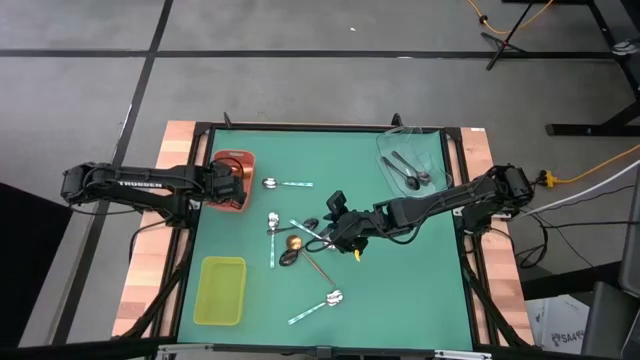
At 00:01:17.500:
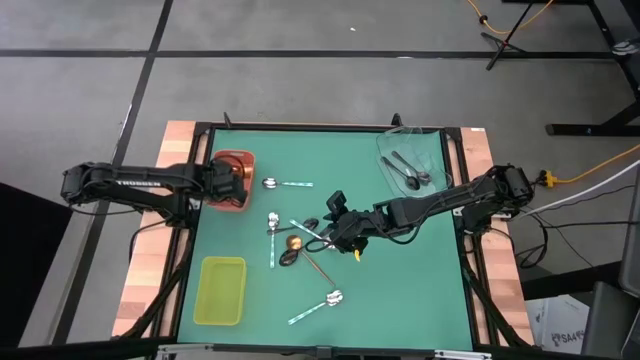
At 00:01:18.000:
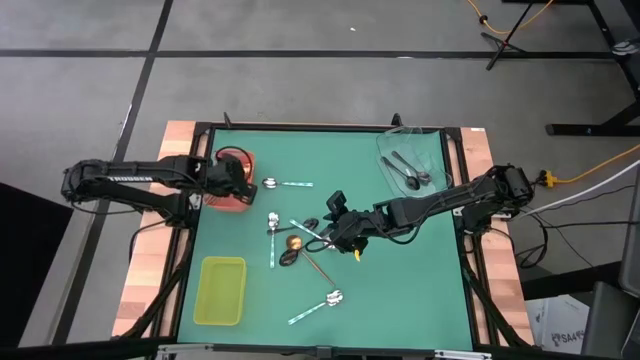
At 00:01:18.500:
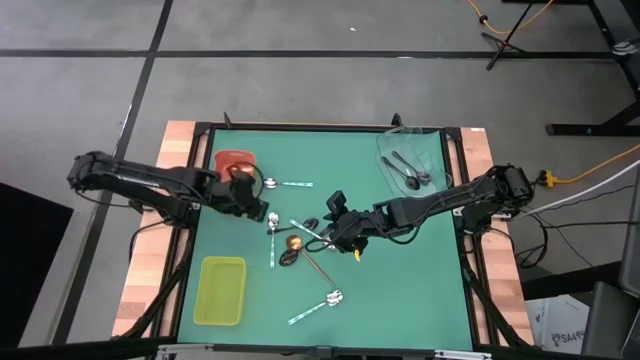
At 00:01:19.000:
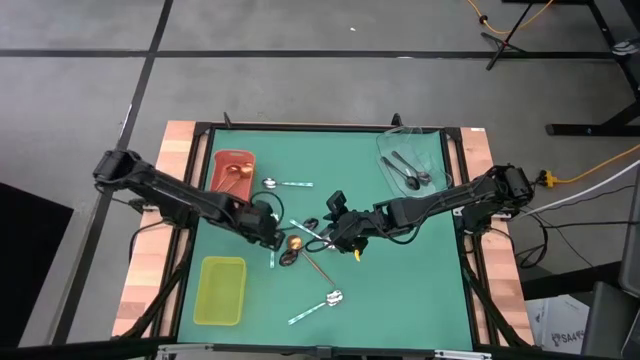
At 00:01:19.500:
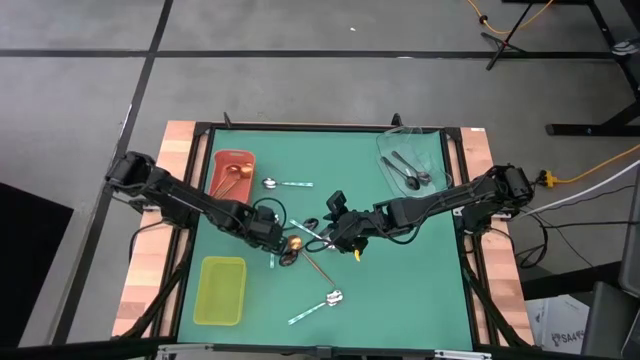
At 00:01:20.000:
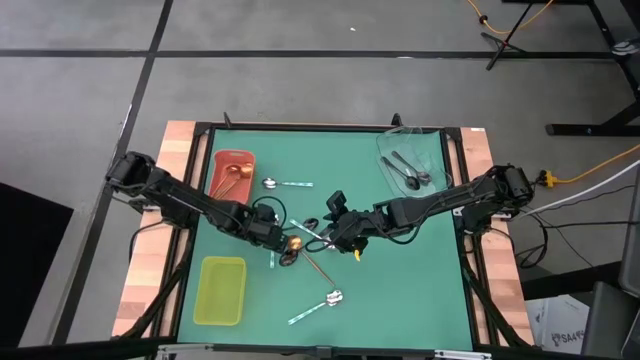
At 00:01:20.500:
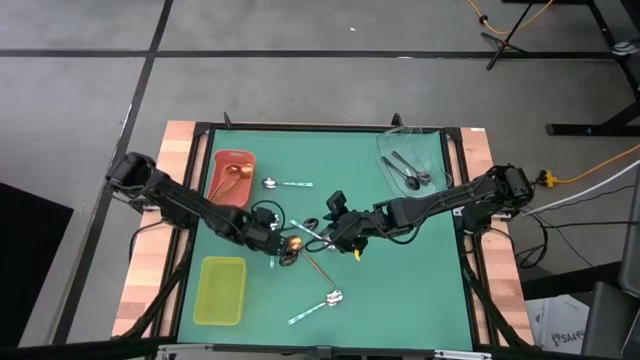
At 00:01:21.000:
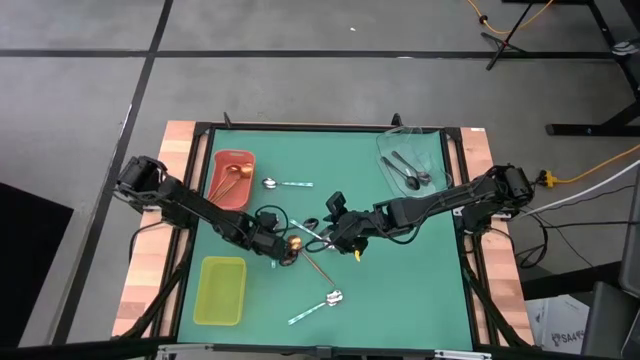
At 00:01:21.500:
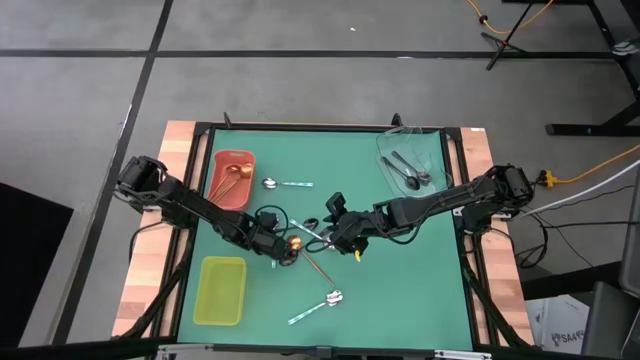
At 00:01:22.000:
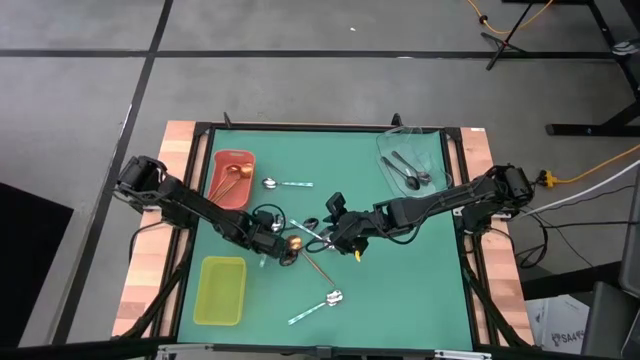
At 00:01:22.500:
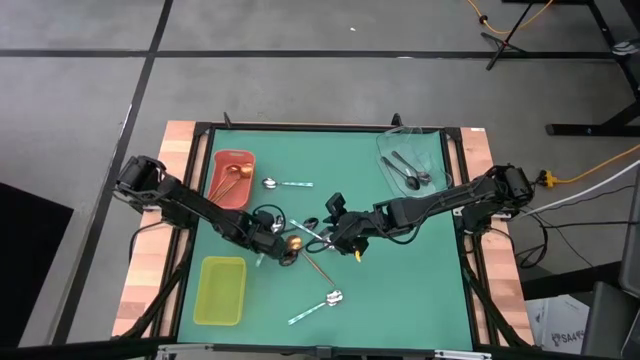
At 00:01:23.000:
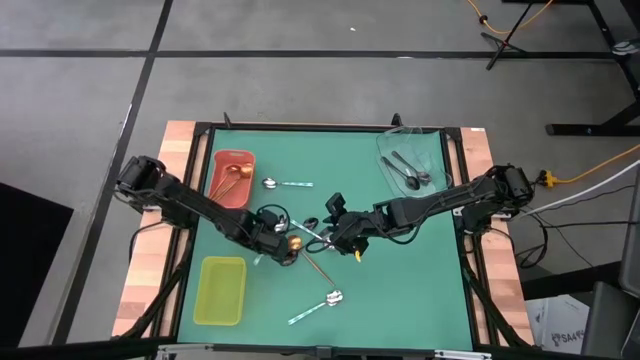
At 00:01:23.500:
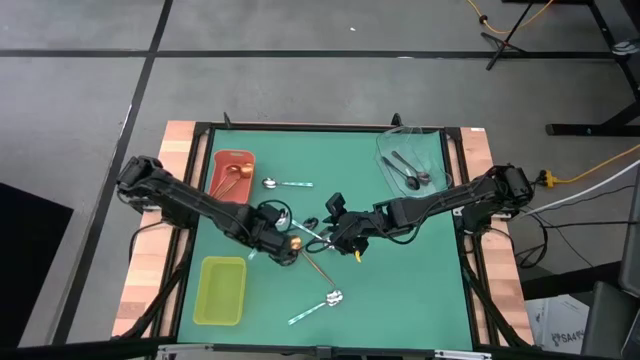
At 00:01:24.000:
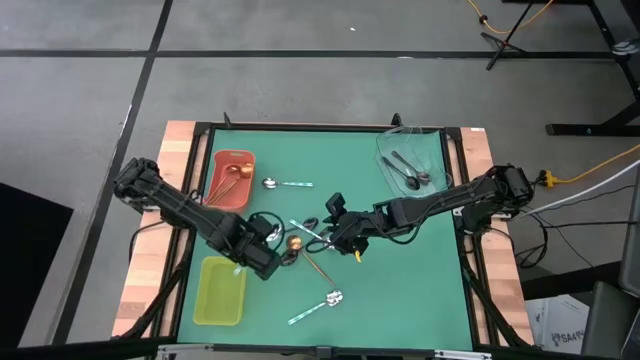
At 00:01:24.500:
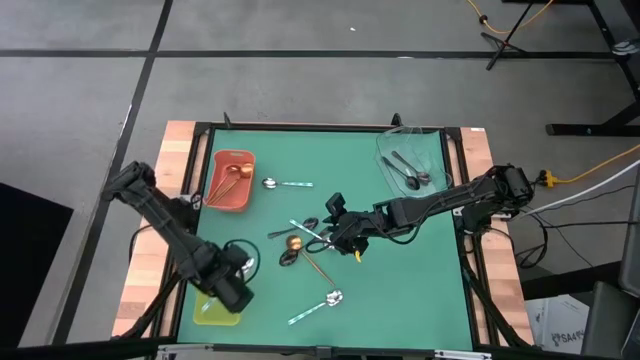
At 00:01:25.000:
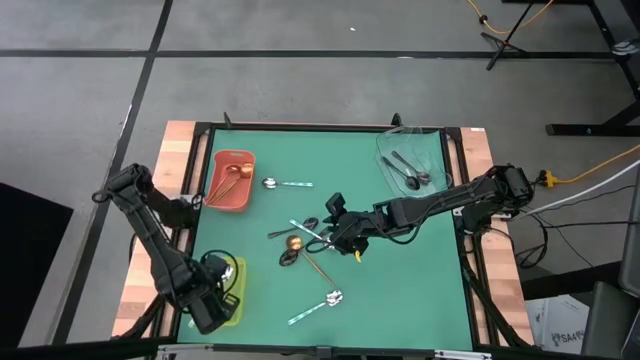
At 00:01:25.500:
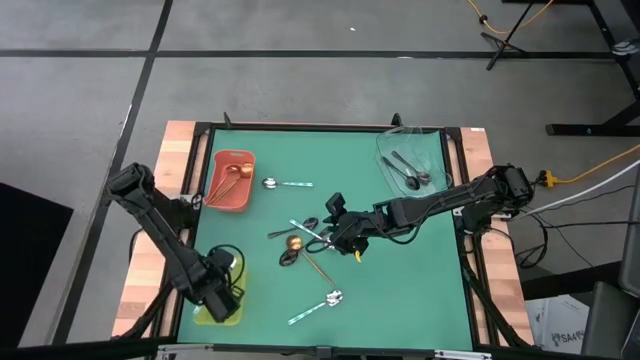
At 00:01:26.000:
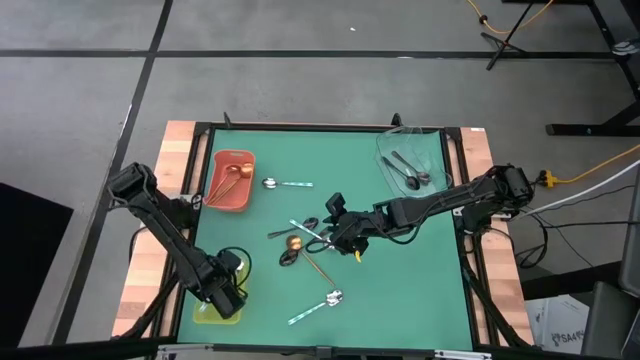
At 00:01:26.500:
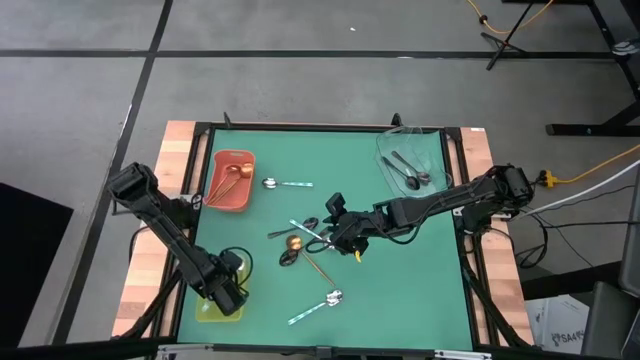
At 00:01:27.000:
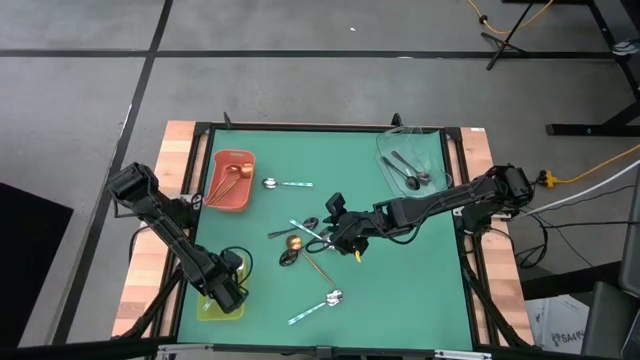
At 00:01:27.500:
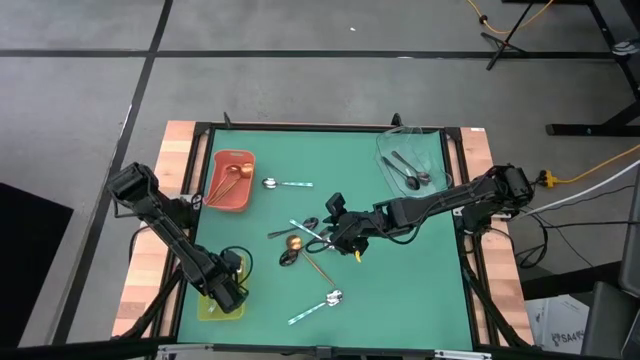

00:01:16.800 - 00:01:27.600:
Task: Sort silverware by color (type)
Put the blue patterned spoon into the yellow bin

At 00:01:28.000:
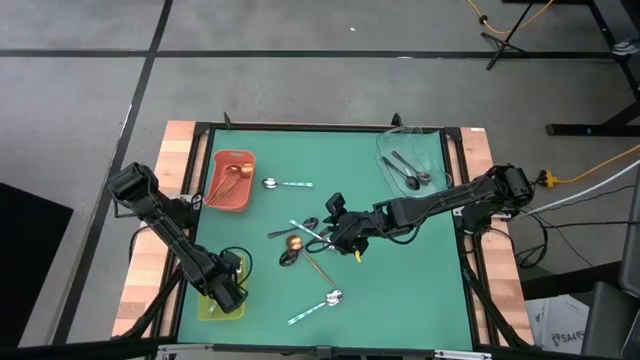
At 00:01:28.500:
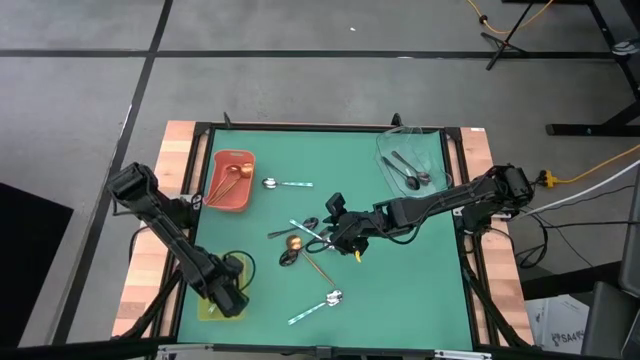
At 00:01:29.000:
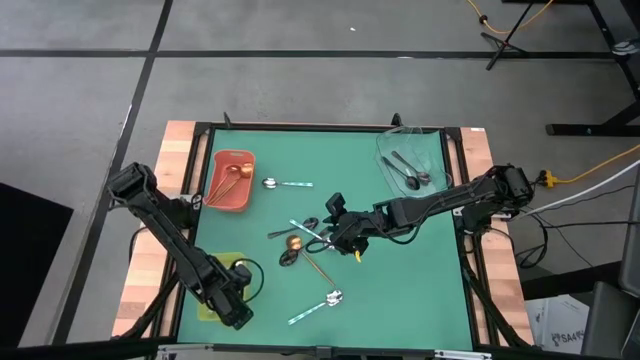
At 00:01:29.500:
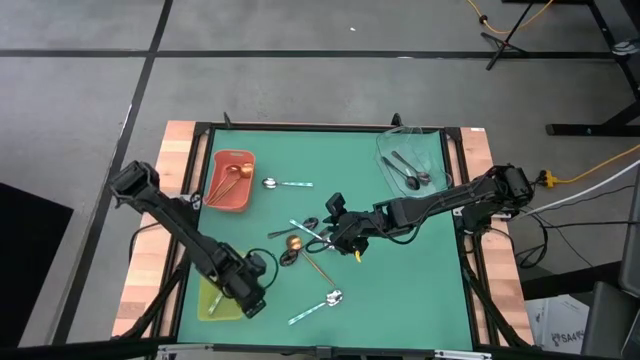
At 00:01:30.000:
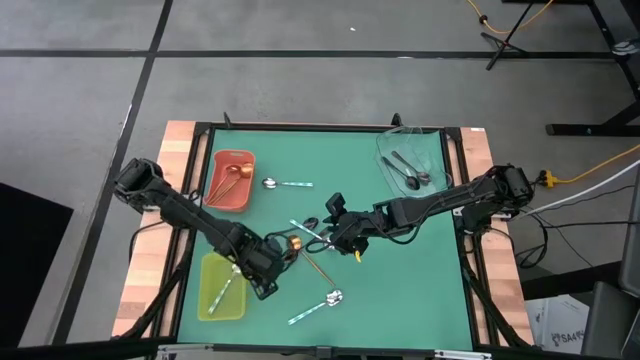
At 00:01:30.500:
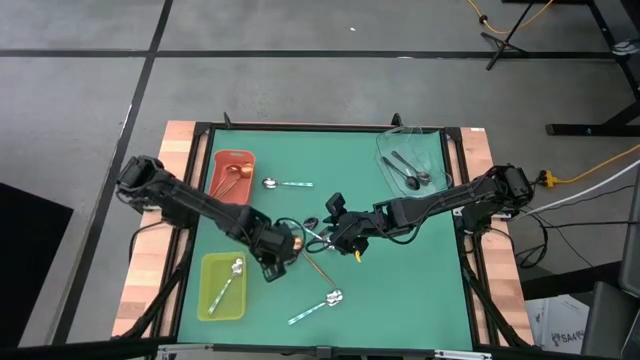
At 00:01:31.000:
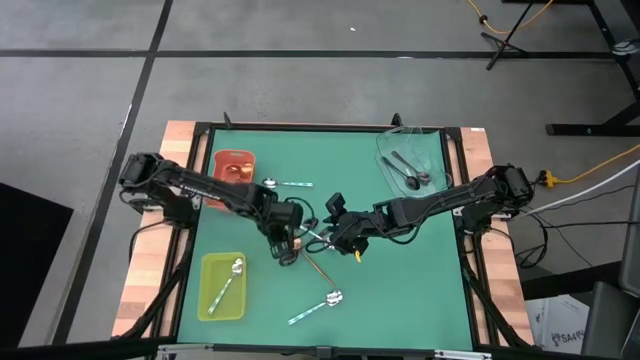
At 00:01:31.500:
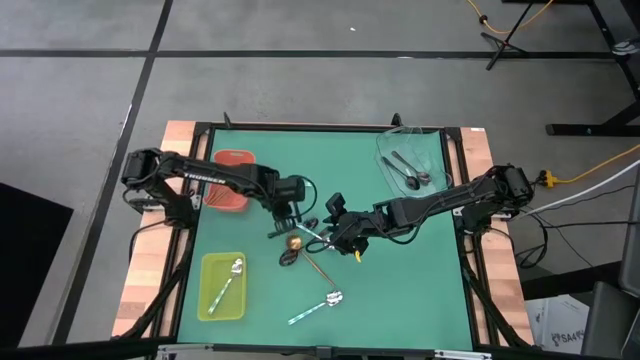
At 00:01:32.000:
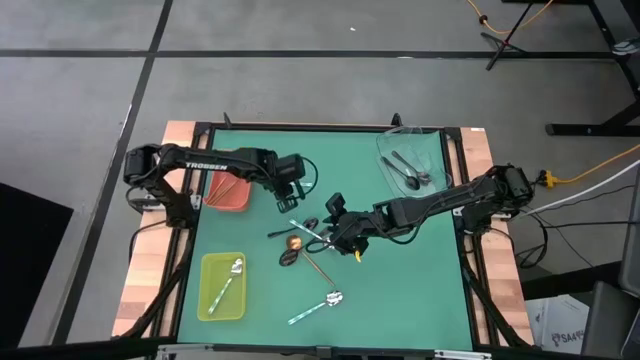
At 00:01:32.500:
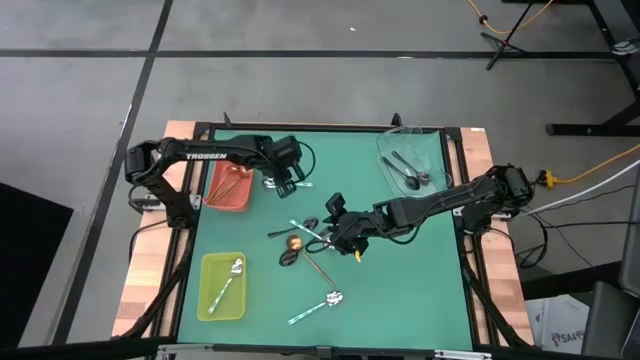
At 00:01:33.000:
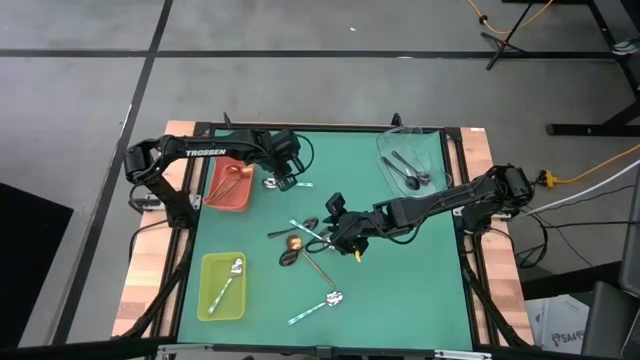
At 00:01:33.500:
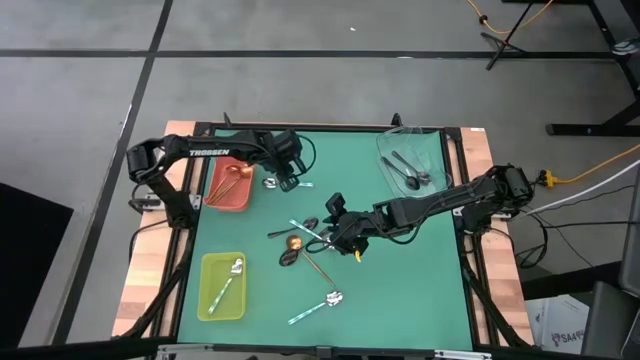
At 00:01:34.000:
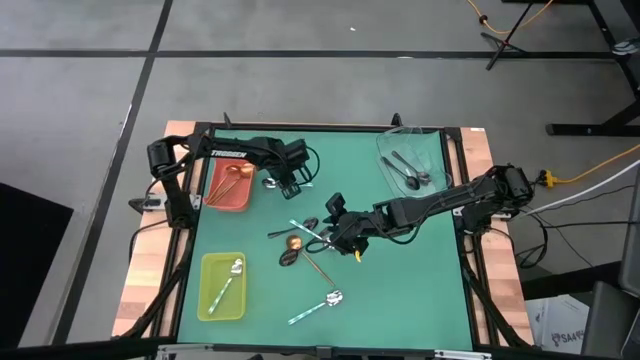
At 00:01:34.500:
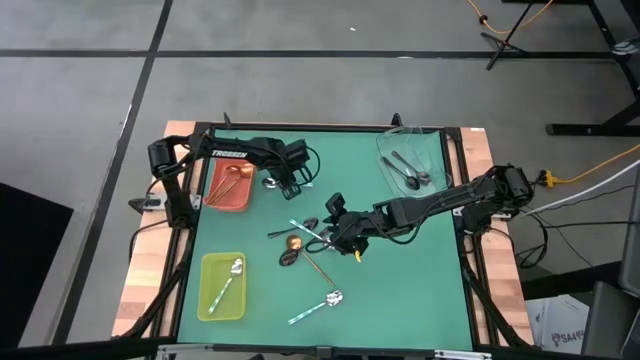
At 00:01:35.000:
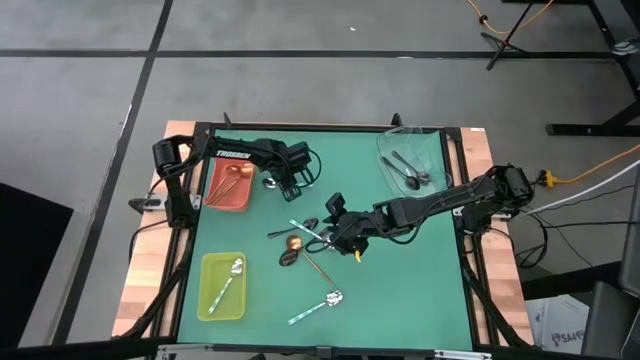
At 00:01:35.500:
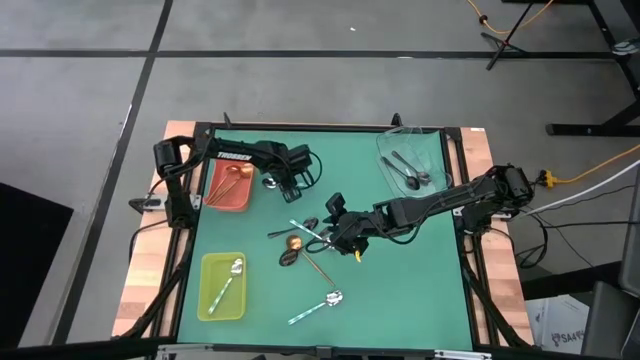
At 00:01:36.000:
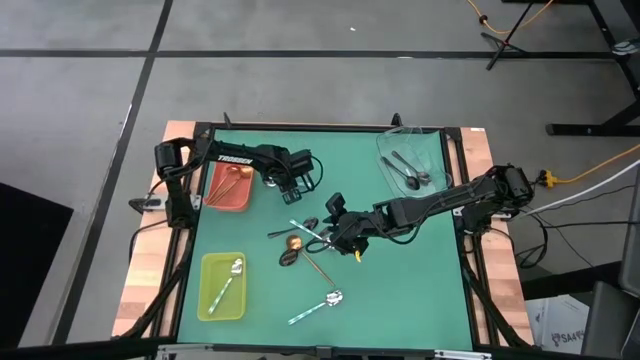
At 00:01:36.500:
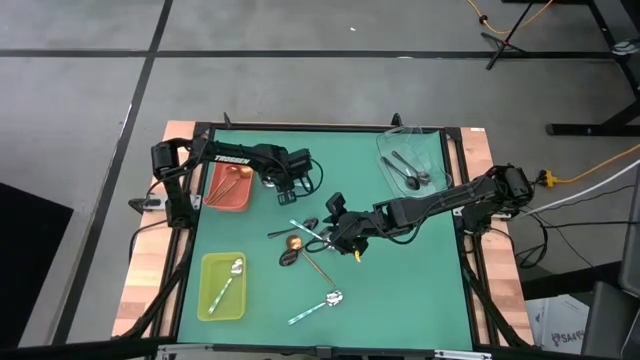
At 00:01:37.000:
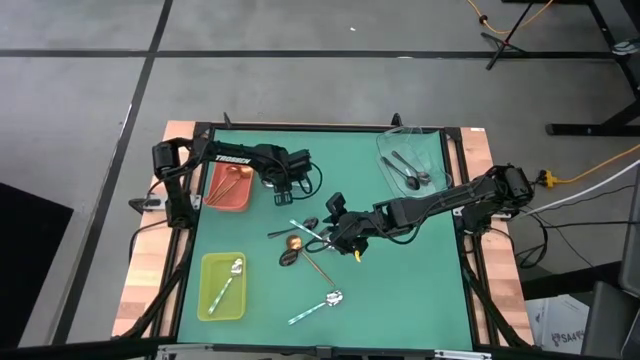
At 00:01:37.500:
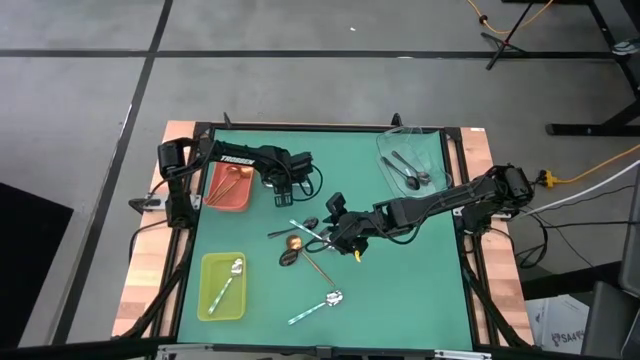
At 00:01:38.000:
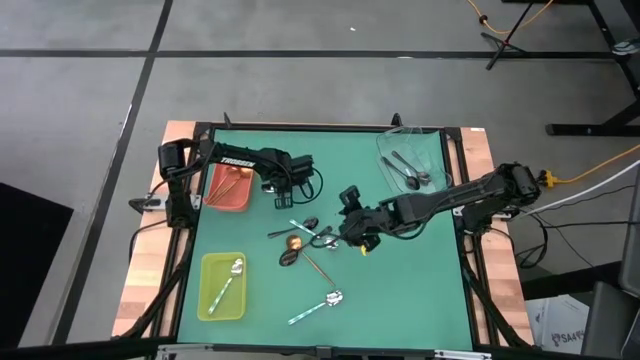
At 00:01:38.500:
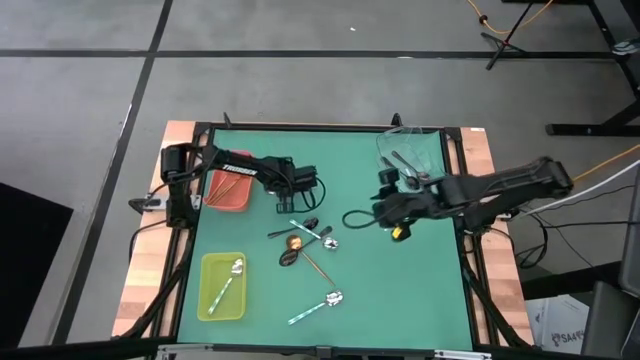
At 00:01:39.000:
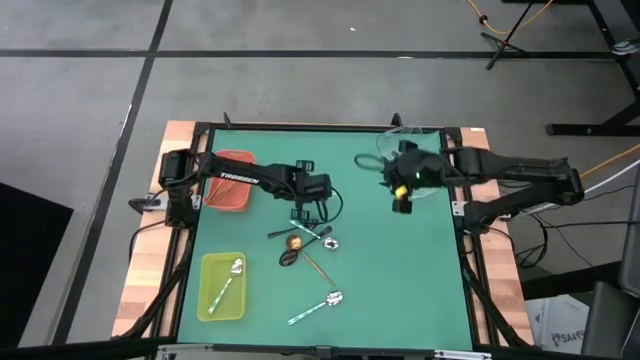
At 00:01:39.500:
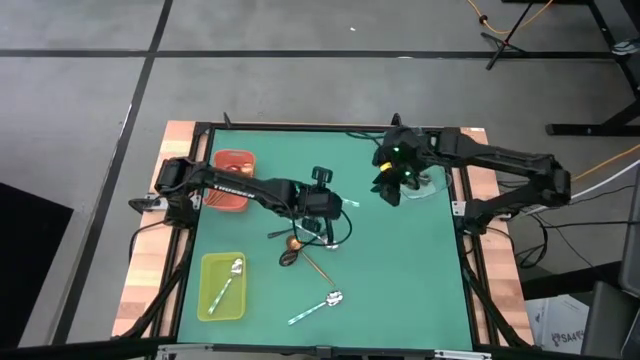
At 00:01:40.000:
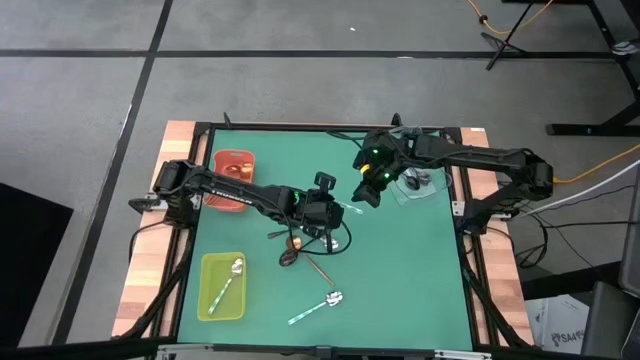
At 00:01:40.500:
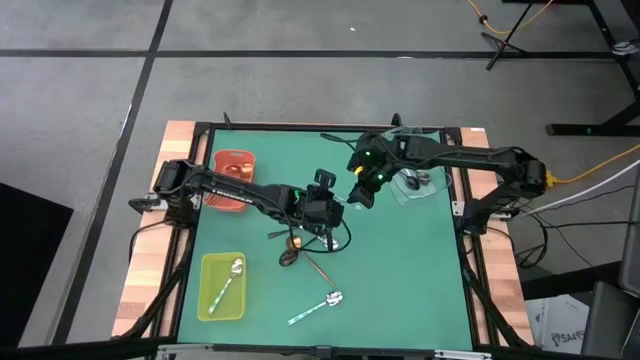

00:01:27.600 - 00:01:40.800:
Put the blue patterned spoon into the yellow bin
